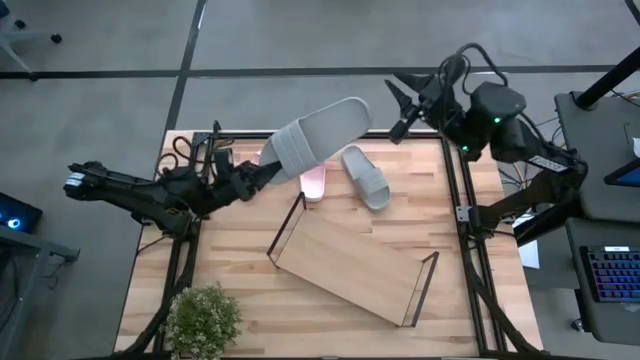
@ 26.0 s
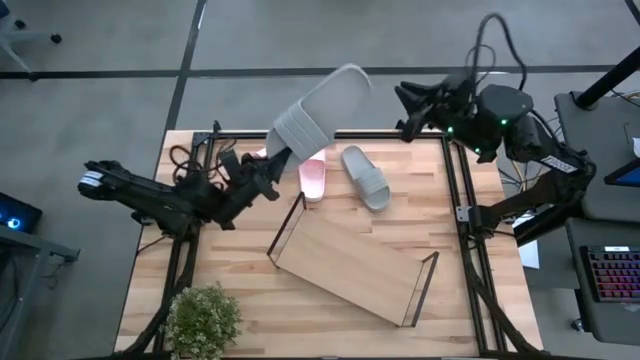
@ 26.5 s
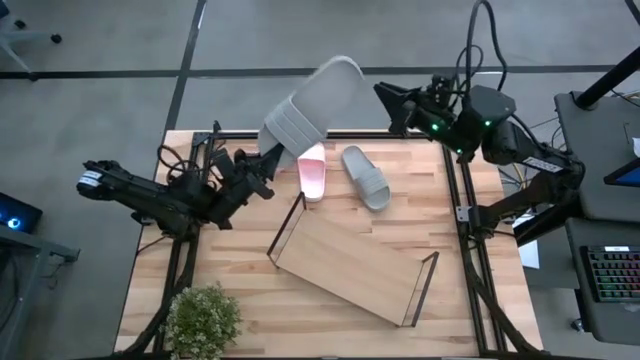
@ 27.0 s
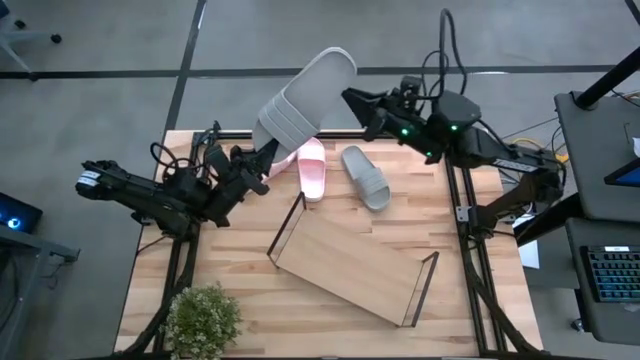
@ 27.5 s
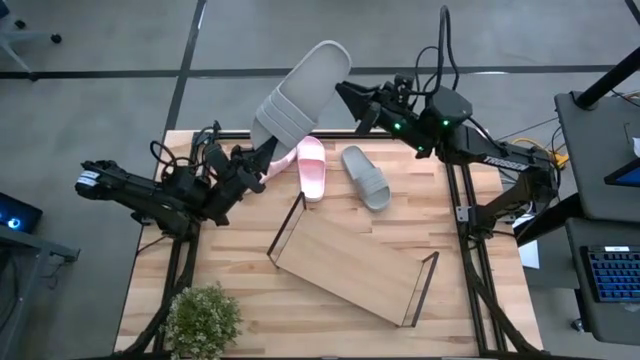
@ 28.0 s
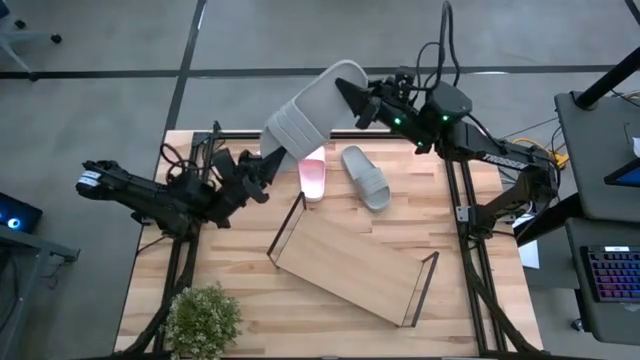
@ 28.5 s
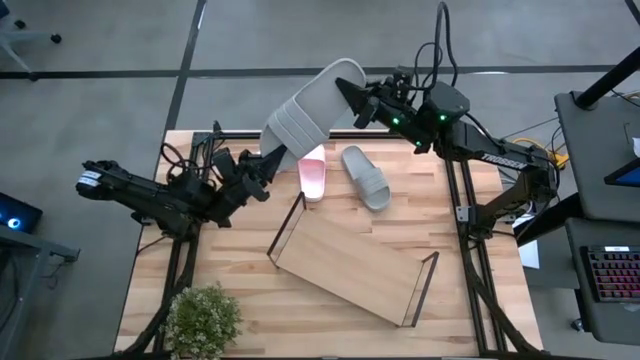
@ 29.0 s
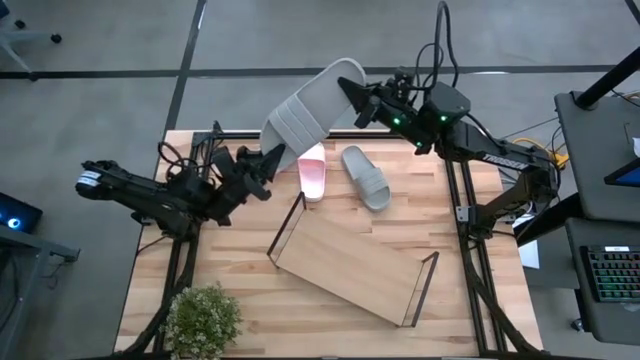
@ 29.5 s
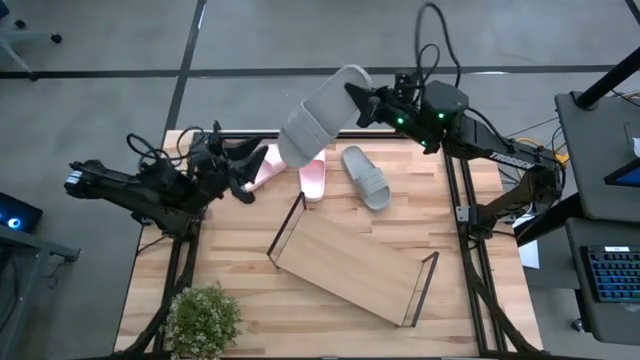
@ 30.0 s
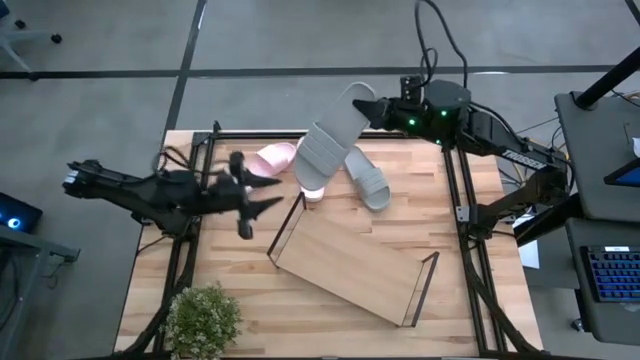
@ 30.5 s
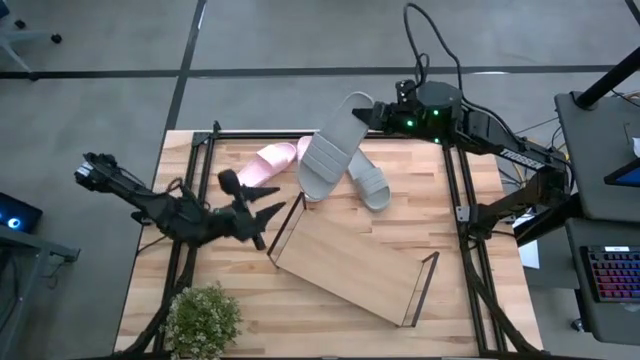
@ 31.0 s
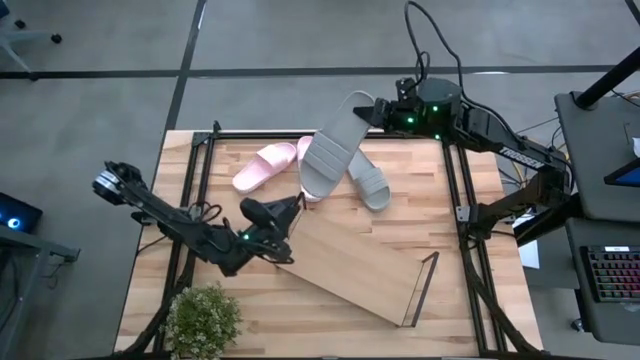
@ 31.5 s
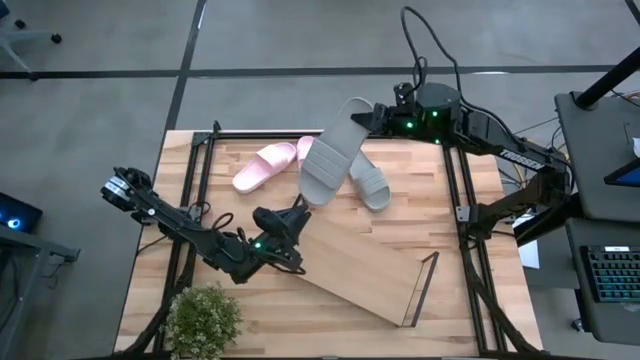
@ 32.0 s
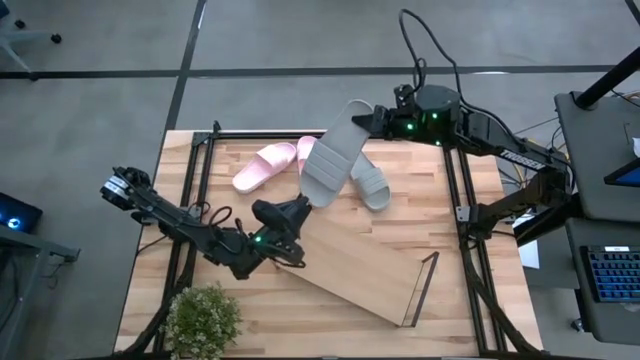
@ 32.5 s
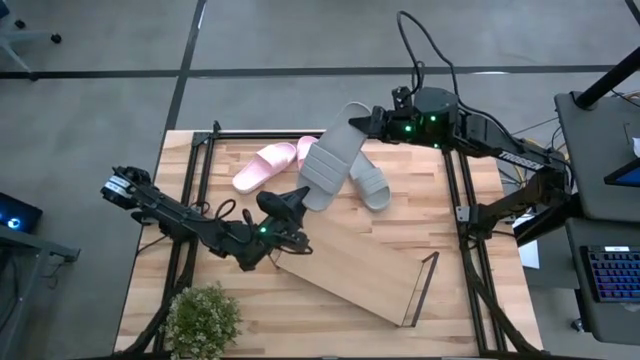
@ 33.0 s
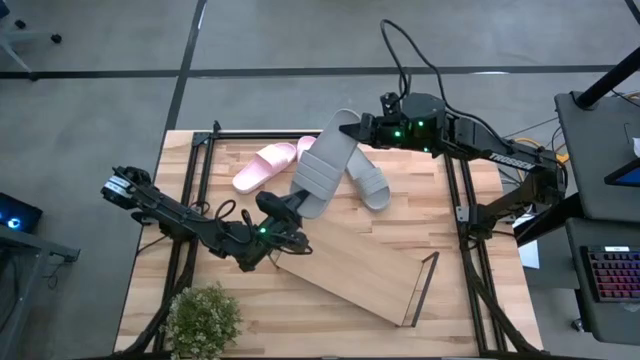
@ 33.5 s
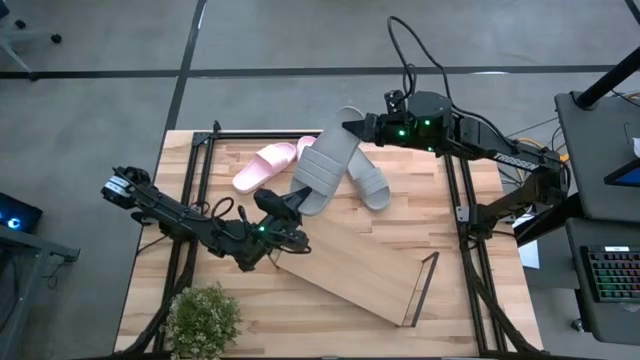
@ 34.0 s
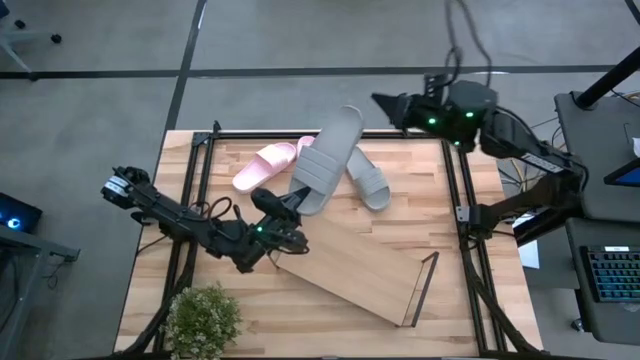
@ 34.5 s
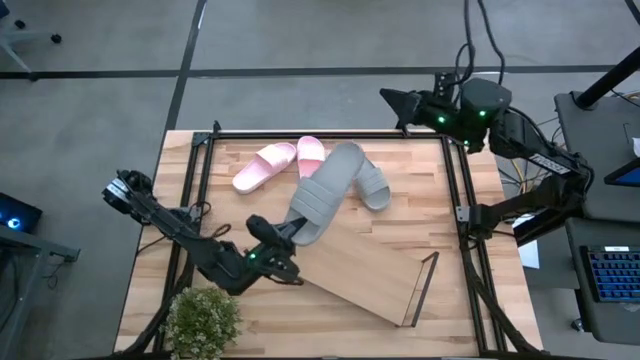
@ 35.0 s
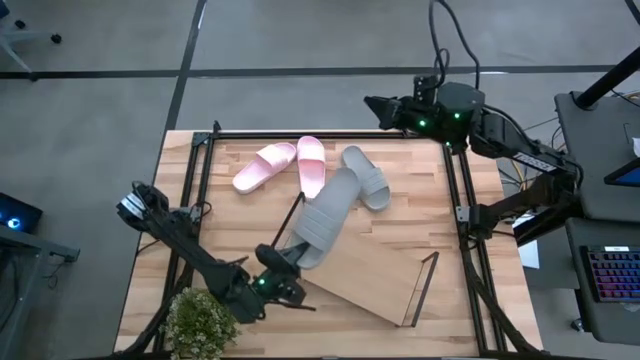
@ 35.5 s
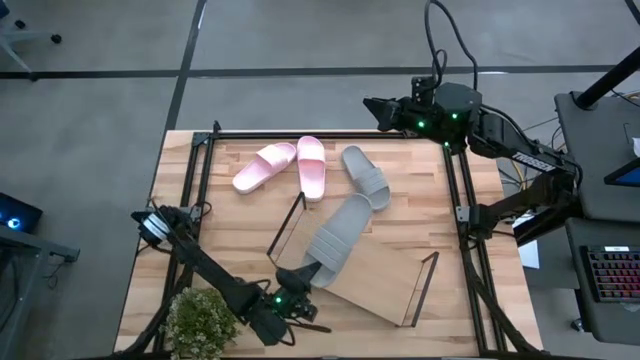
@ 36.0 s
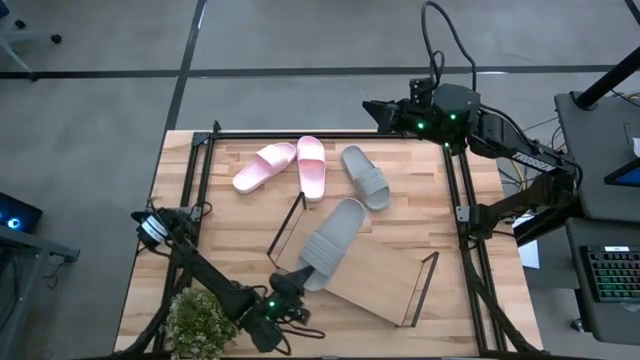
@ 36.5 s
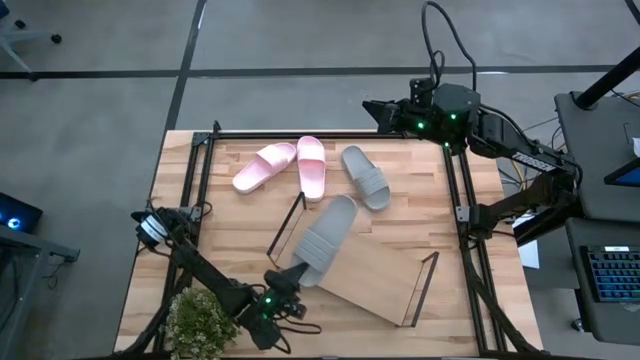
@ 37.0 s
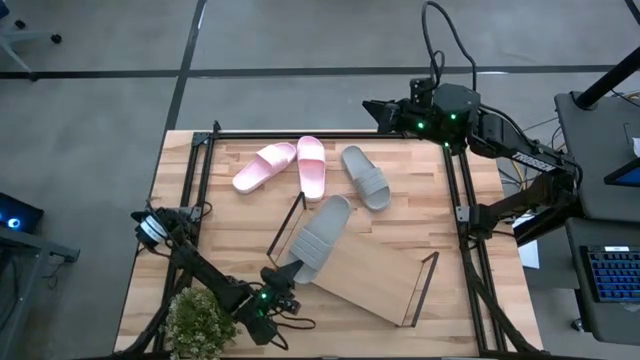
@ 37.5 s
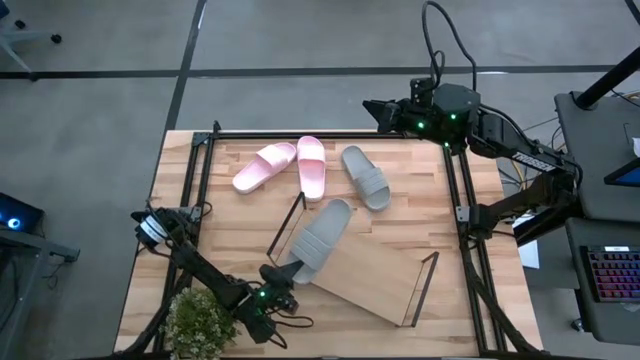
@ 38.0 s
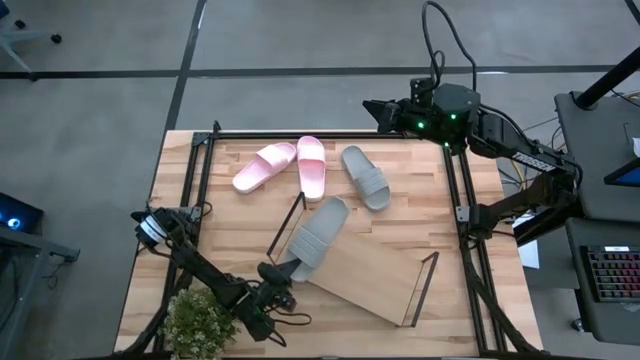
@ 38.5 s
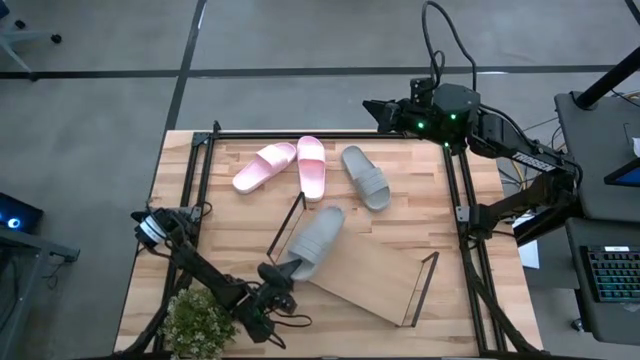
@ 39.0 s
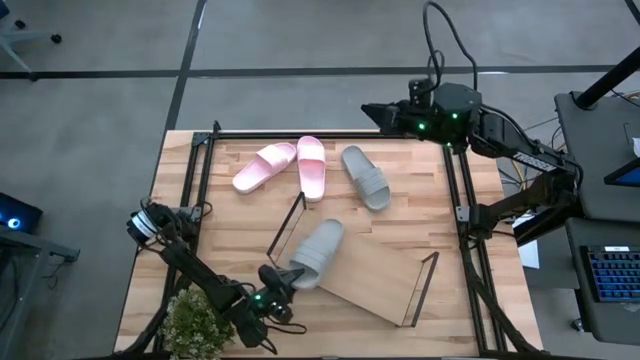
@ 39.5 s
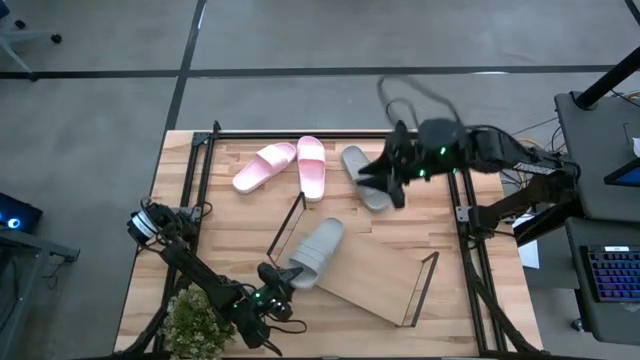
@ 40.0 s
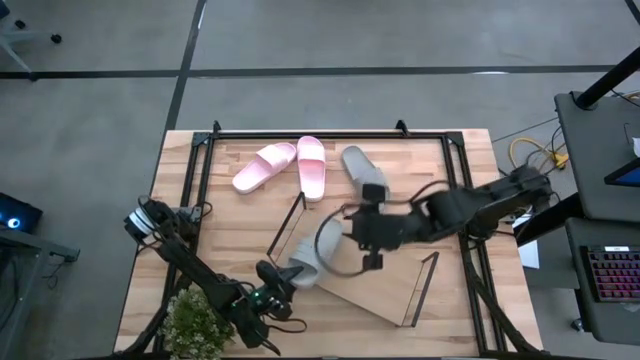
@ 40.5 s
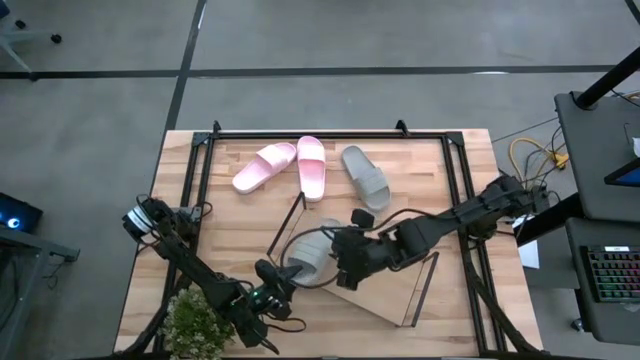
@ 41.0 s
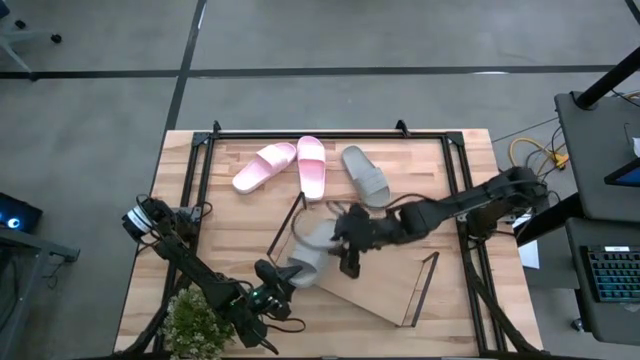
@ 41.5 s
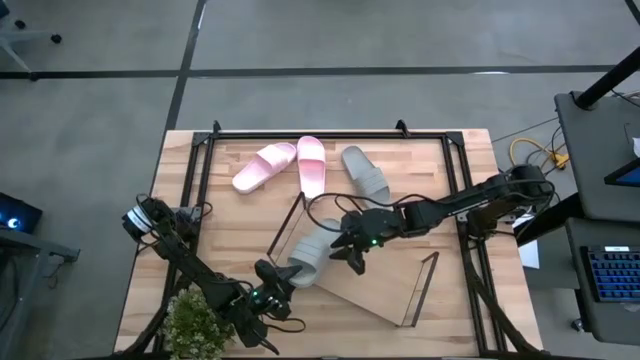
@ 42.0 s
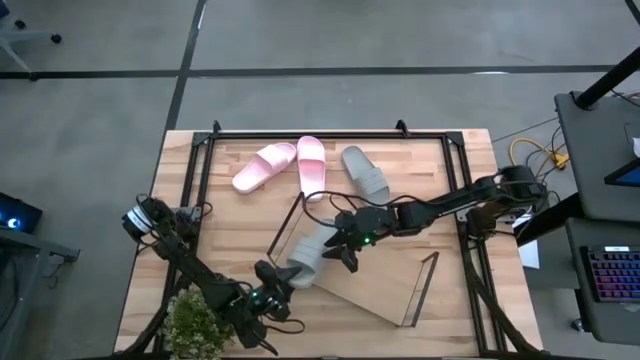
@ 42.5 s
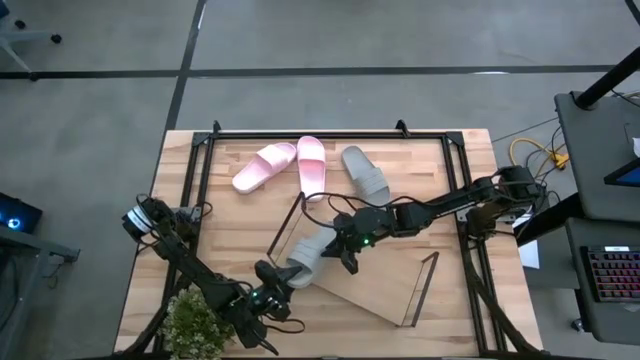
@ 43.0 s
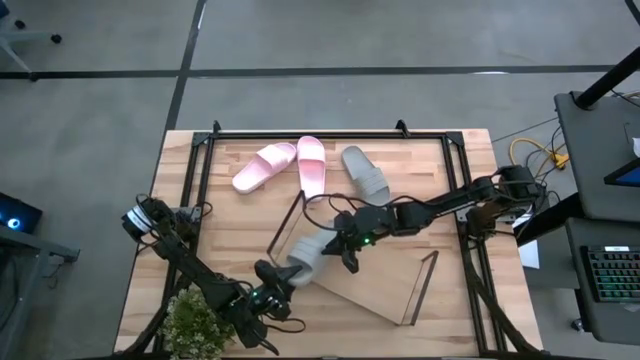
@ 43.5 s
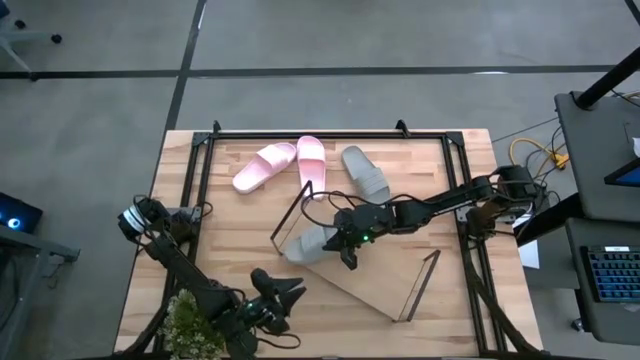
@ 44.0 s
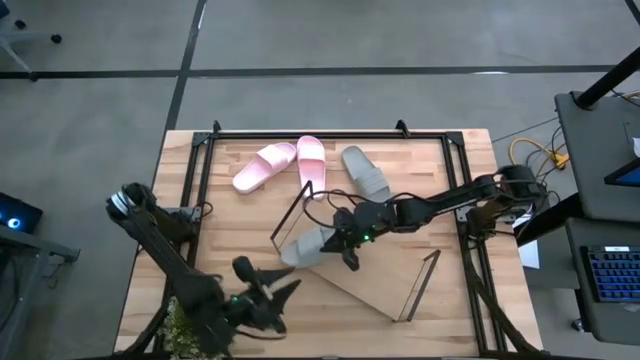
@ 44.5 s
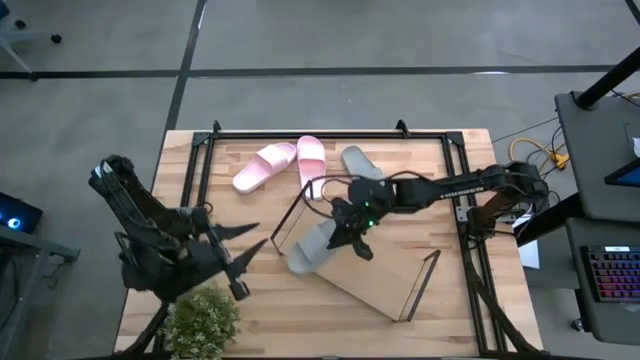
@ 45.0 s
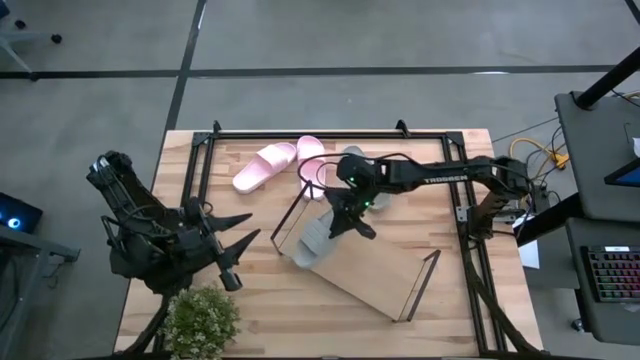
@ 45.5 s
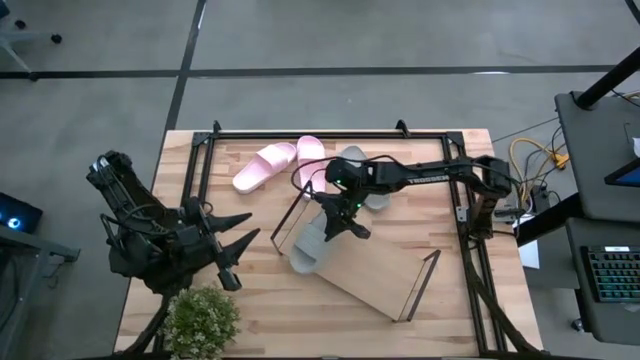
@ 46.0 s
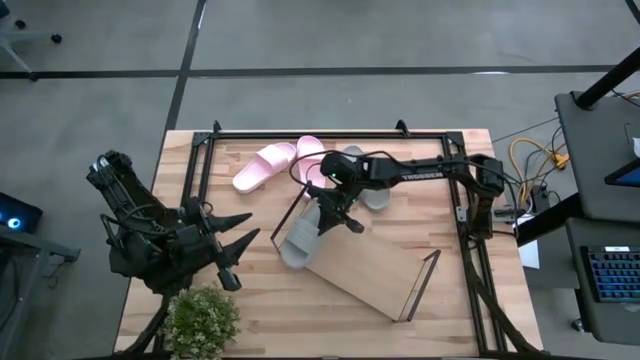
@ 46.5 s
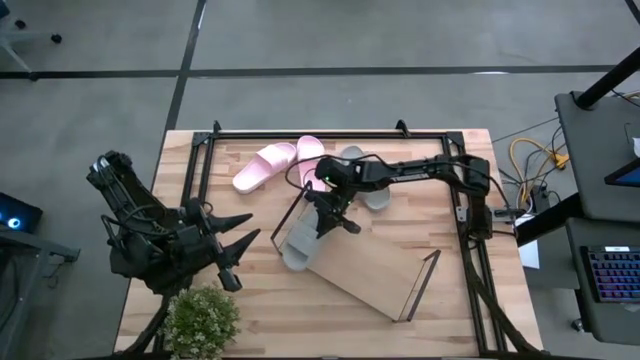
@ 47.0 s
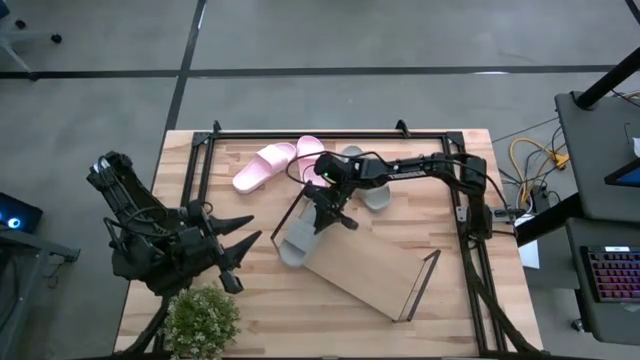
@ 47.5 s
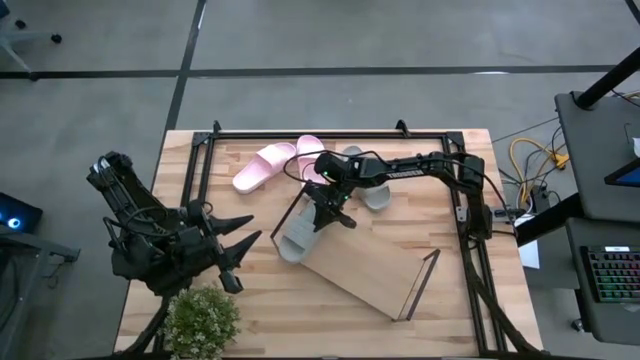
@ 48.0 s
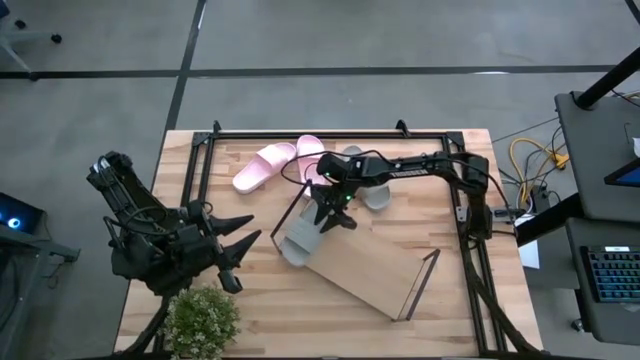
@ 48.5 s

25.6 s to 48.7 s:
Task: Pick and place slides into the shelf
Put the right gray slipper on the shelf
